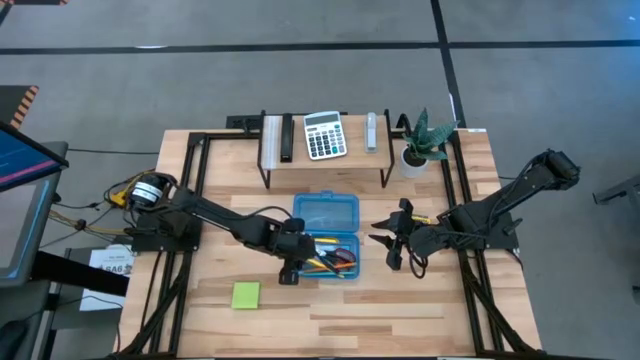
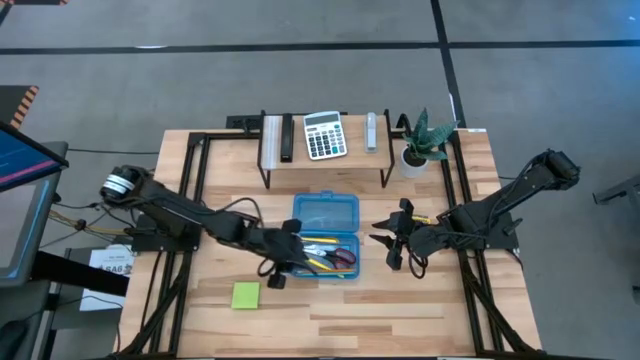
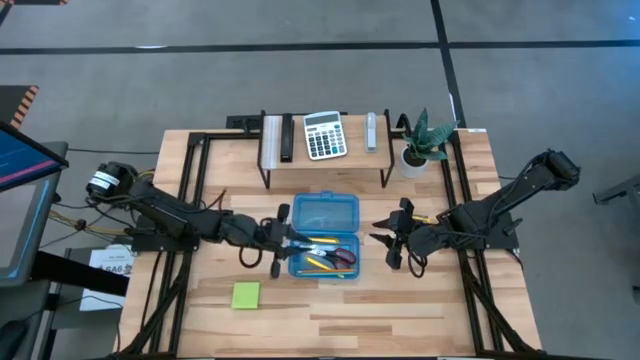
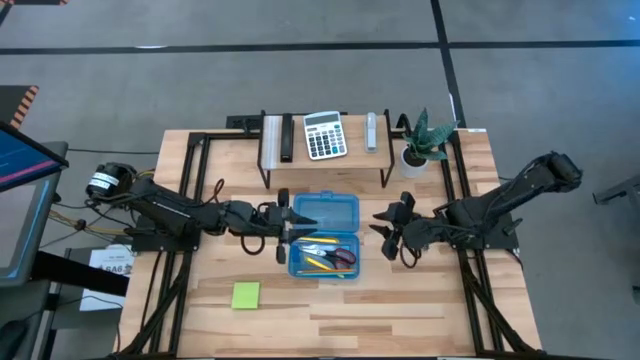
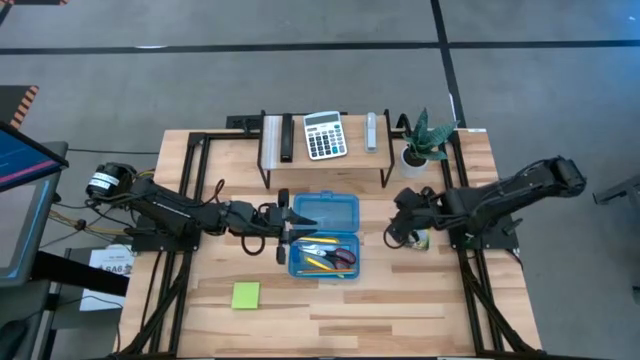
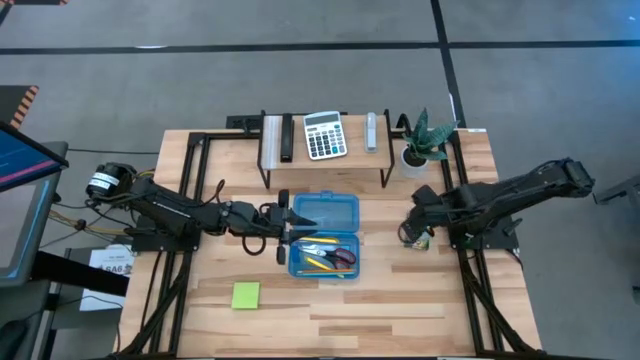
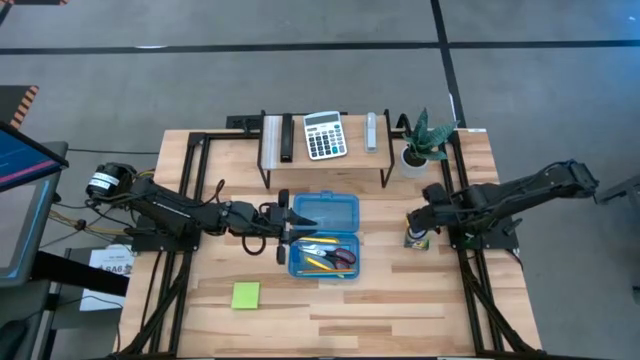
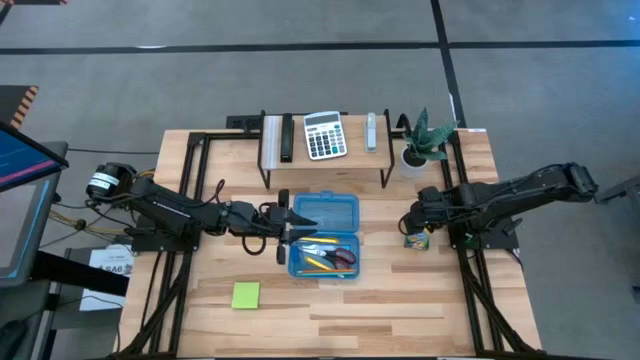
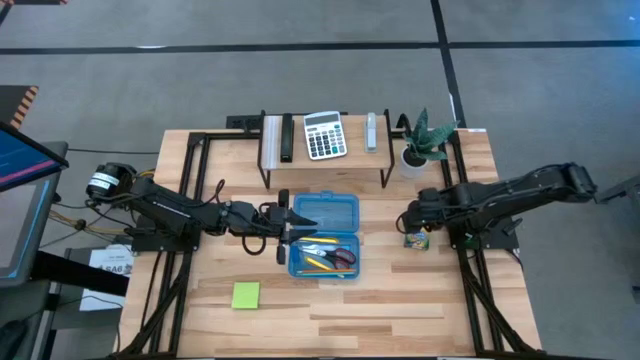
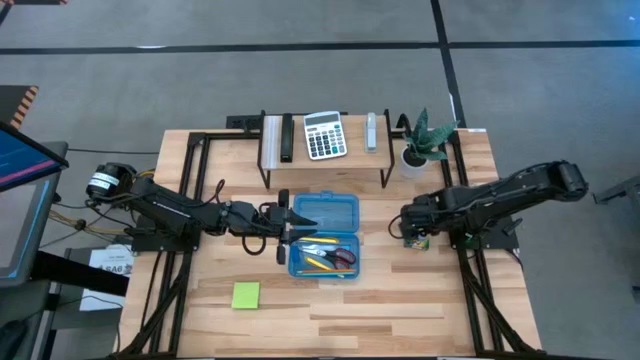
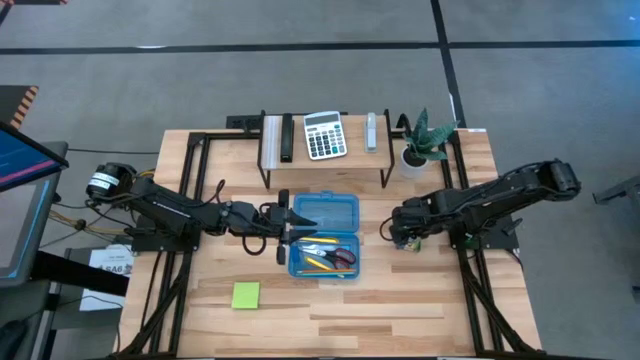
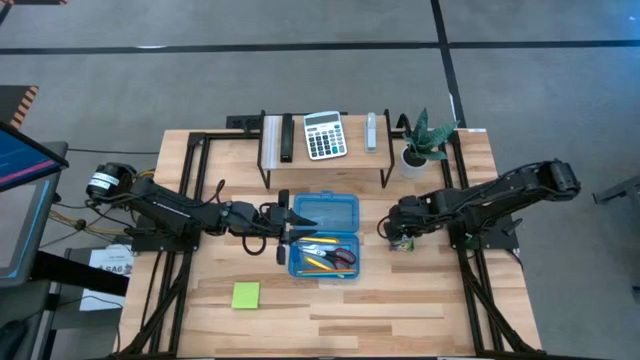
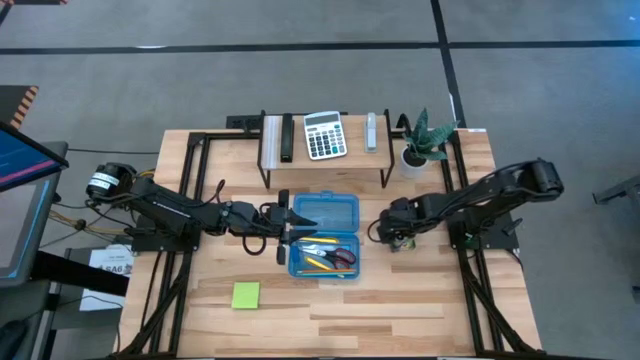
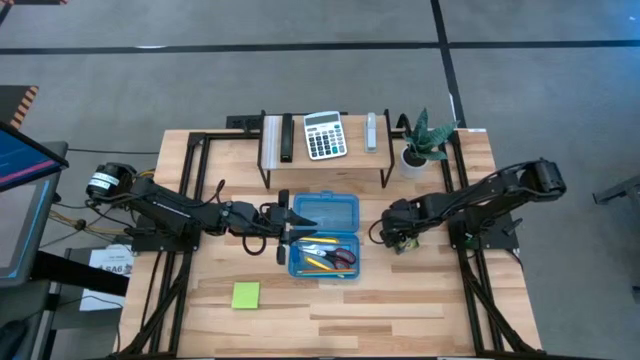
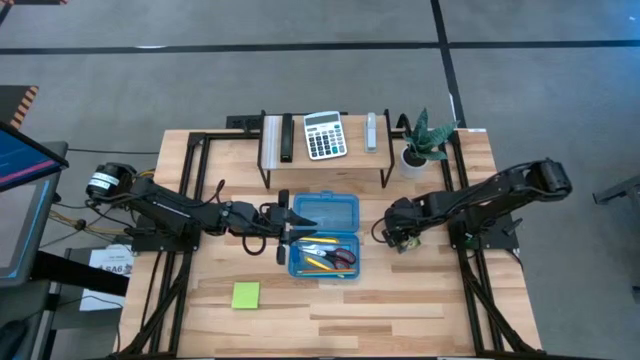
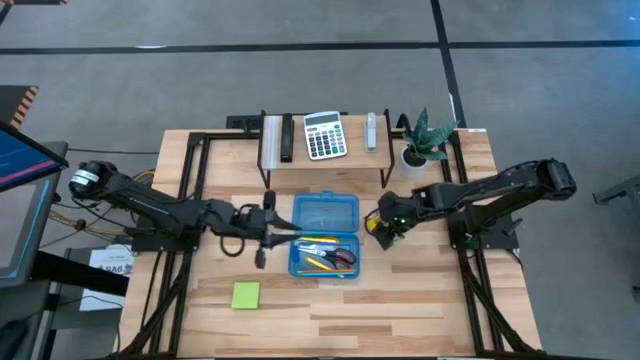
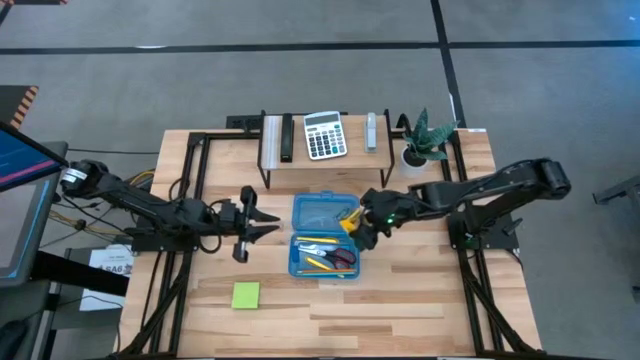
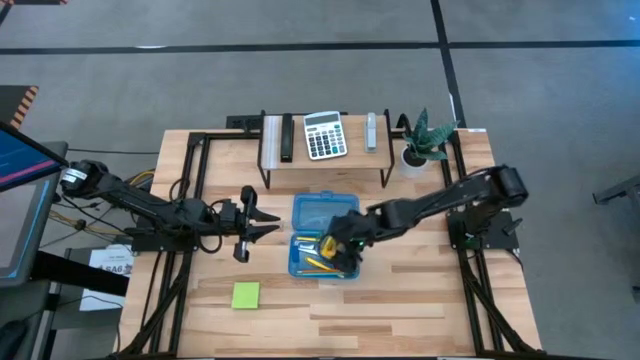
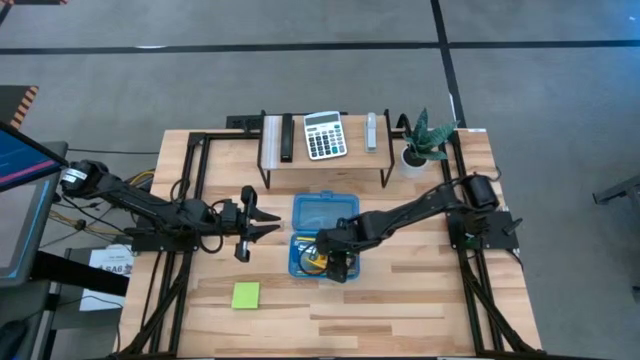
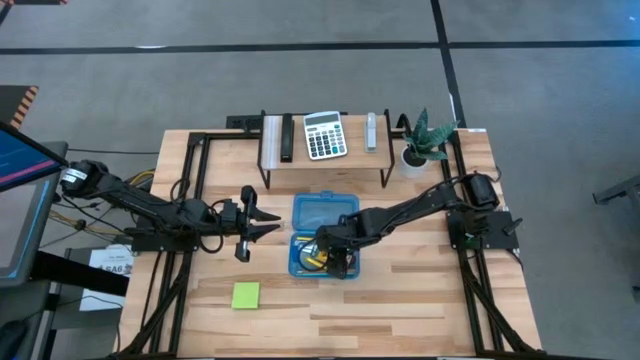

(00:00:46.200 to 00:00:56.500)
Task: Pack school essentials
Put the yellow crayon box into the blue supply box

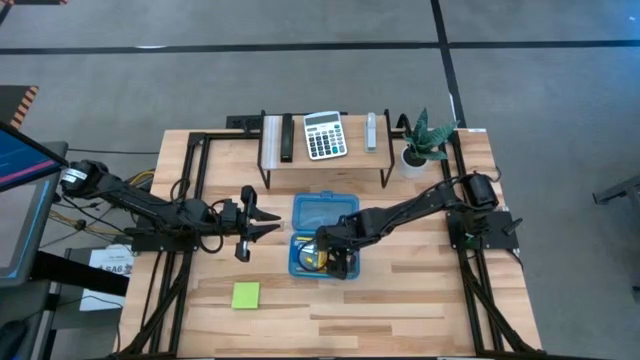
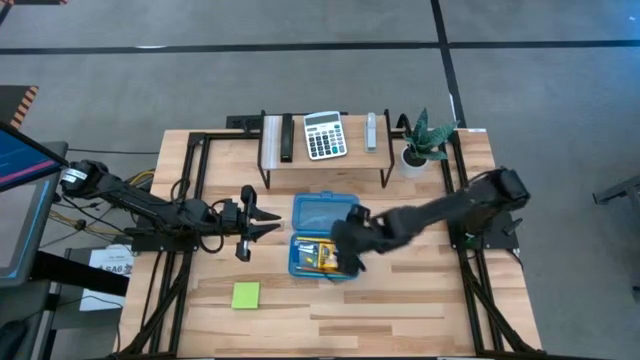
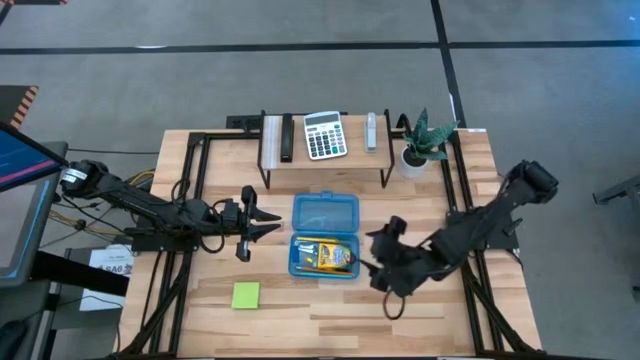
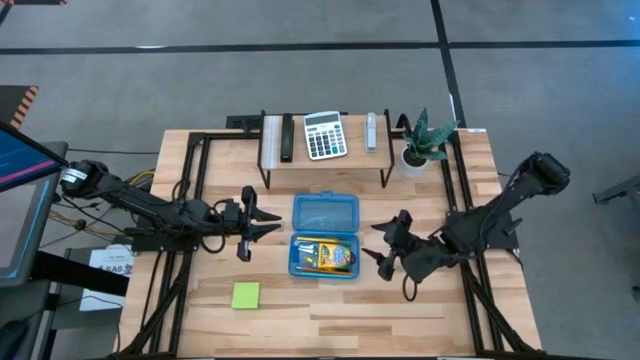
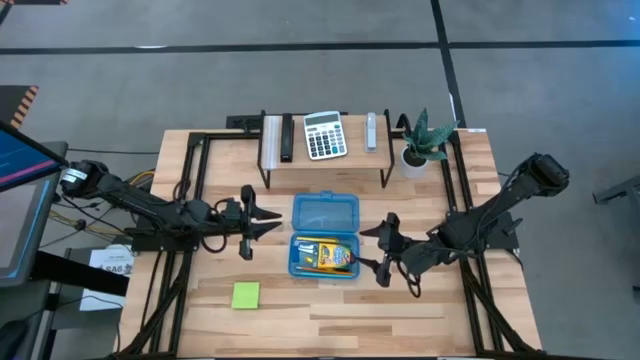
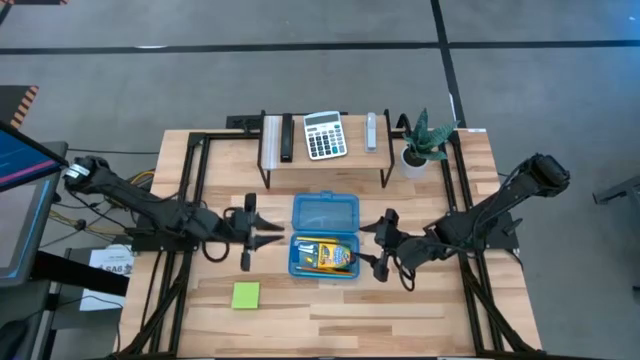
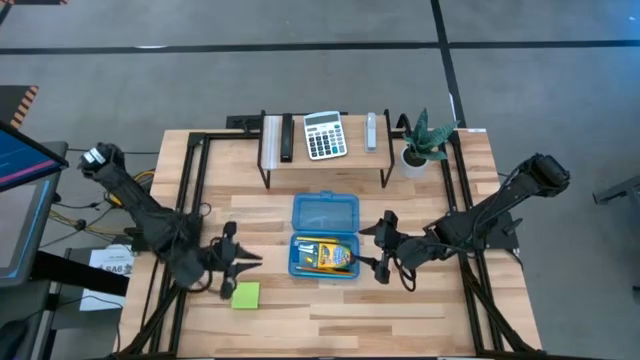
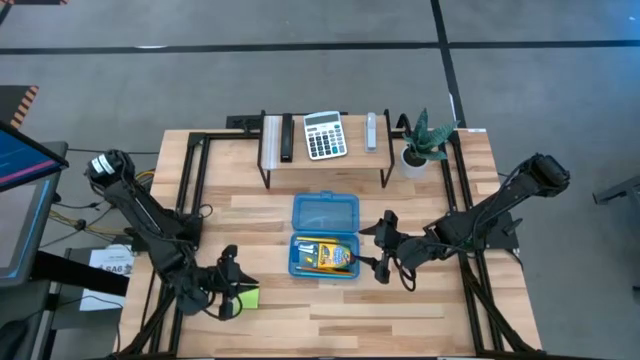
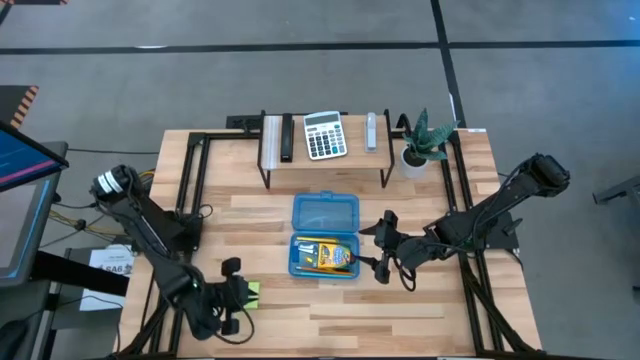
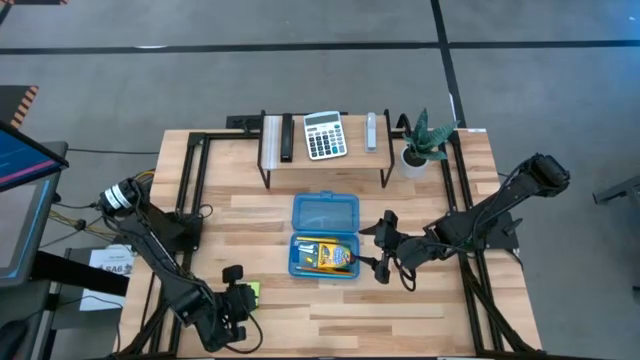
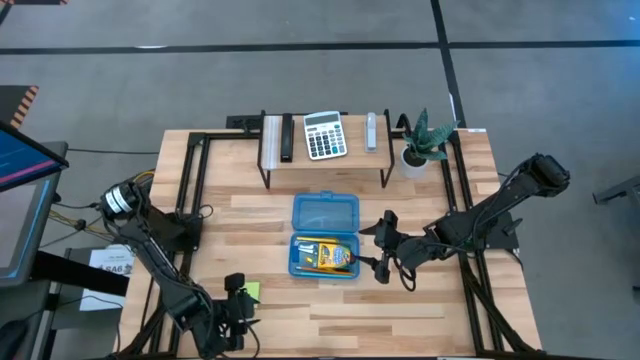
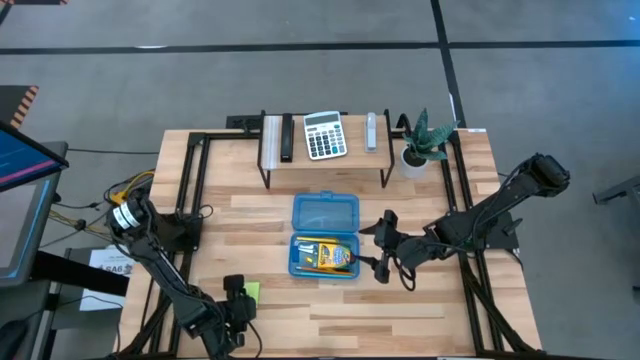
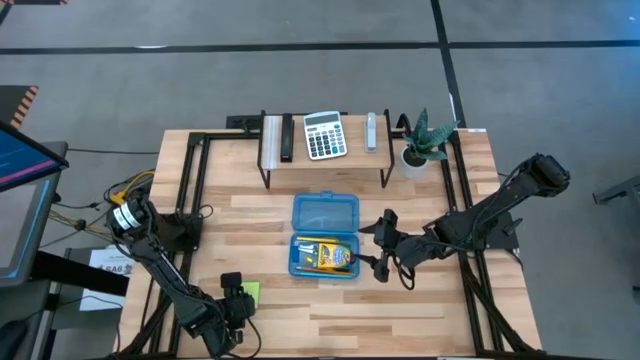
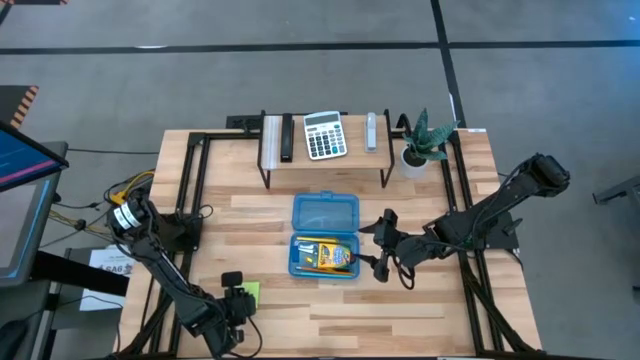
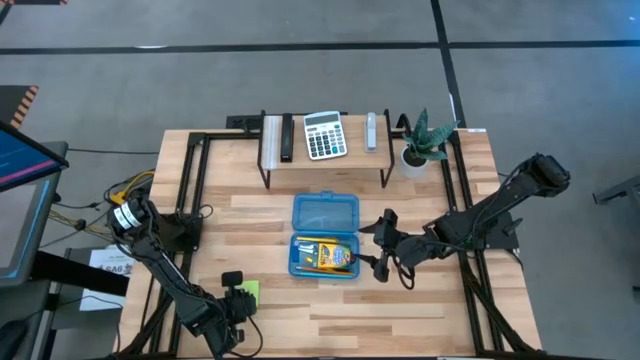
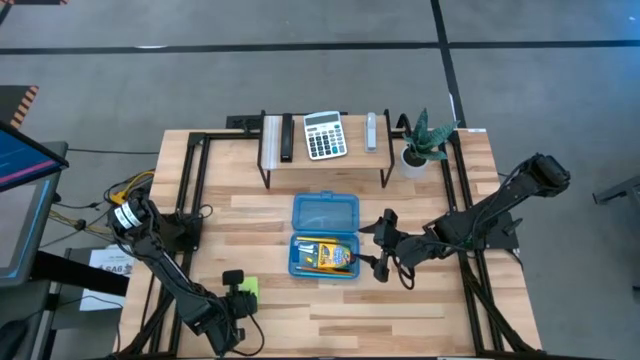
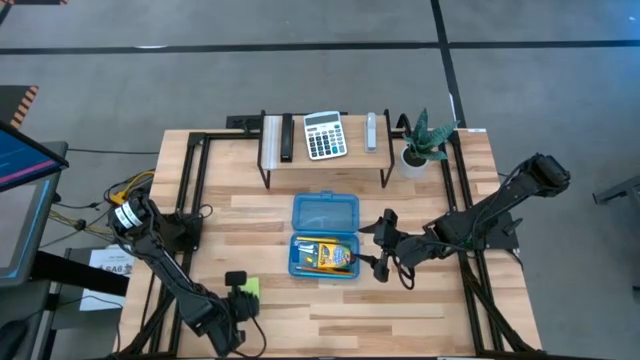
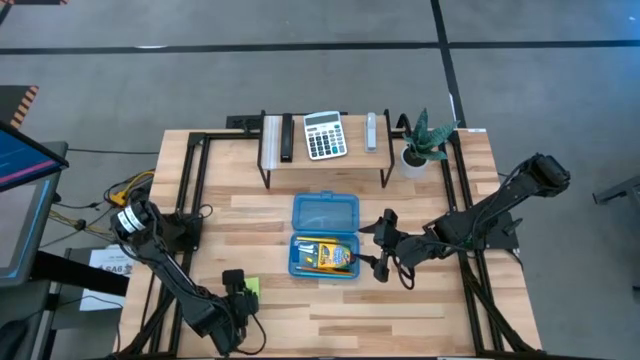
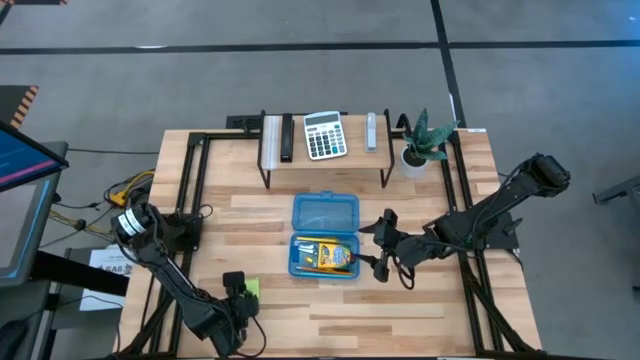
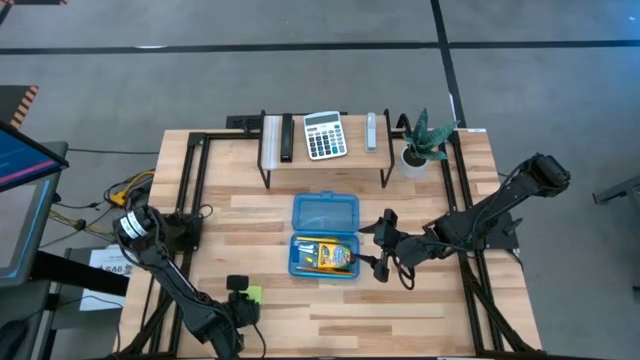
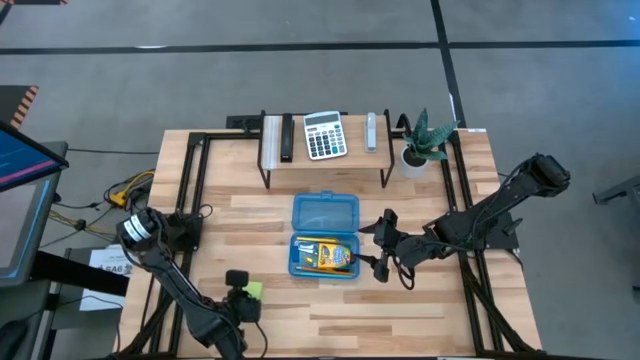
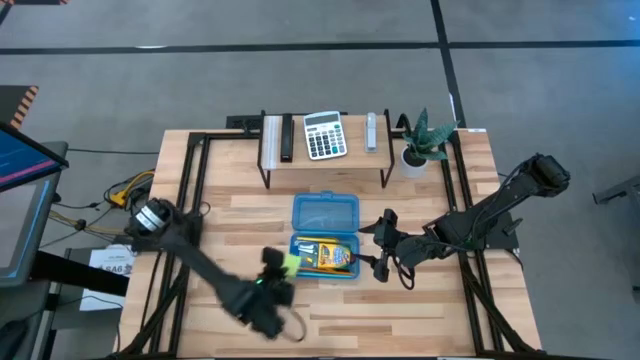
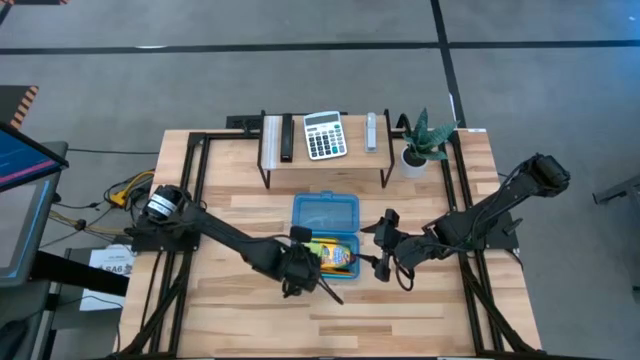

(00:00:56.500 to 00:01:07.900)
Put the green sticky note into the blue supply box

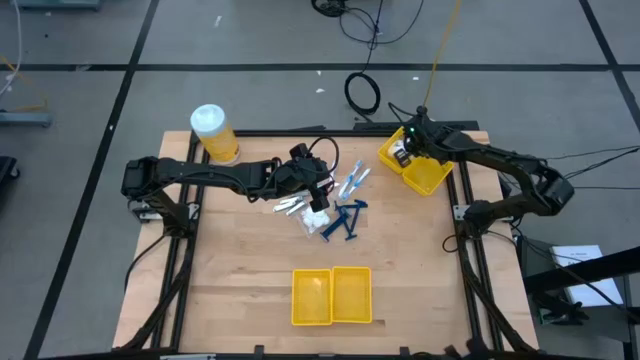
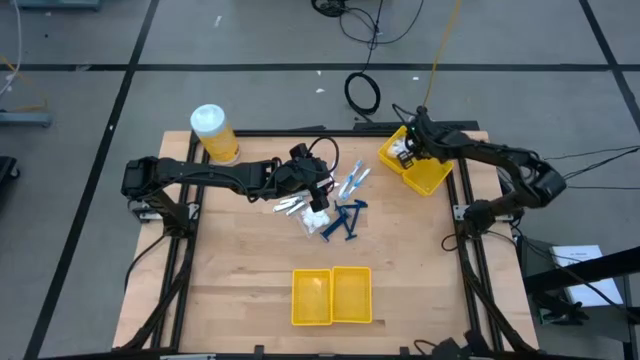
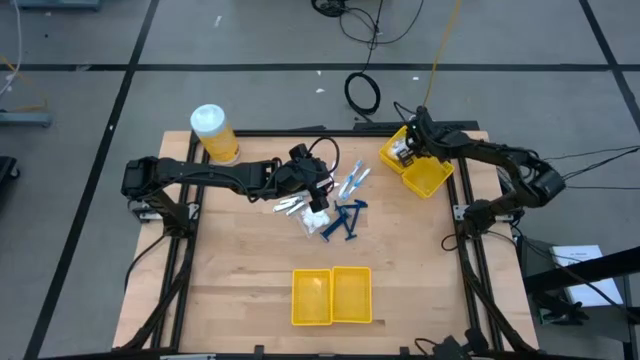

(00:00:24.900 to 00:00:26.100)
Task: Pick & Place Travel size toiletries
Adjust the white cotton pack
